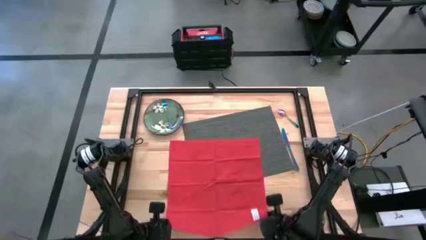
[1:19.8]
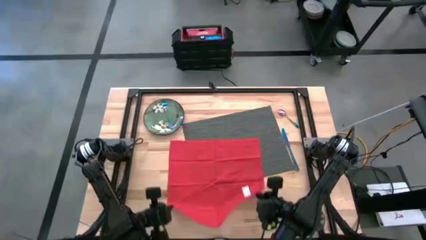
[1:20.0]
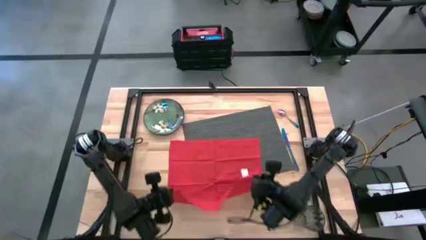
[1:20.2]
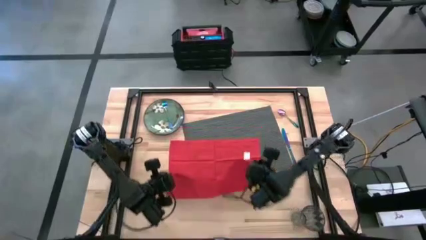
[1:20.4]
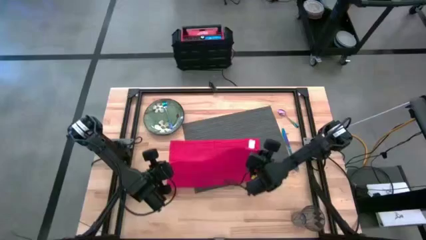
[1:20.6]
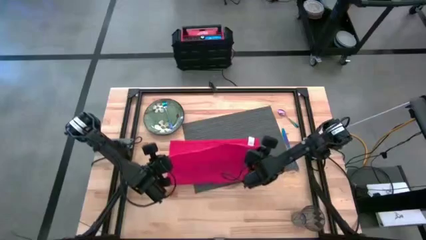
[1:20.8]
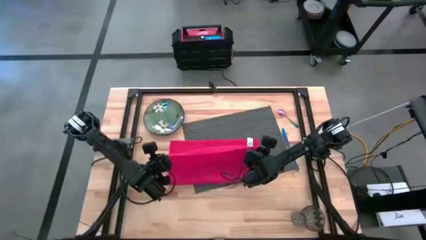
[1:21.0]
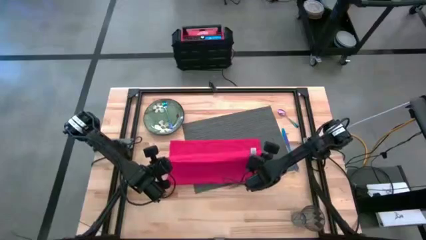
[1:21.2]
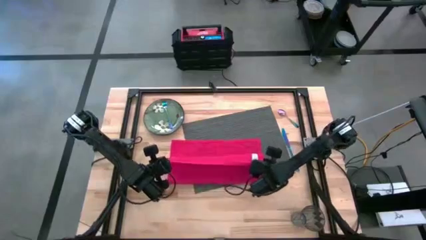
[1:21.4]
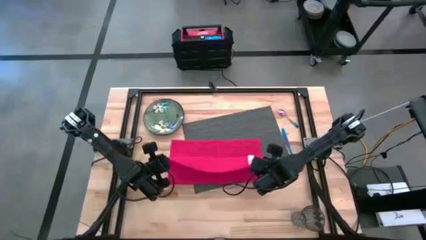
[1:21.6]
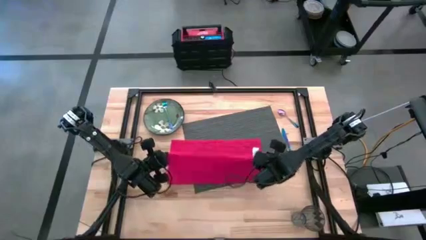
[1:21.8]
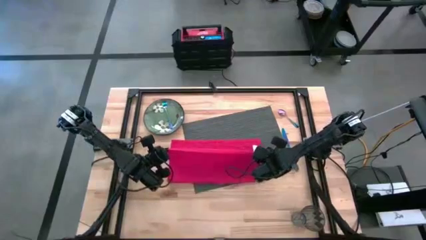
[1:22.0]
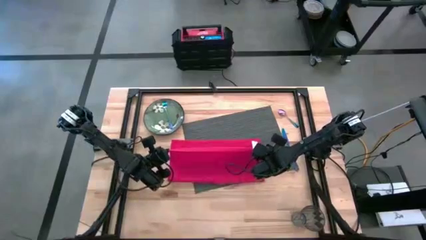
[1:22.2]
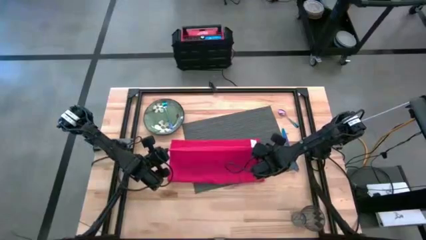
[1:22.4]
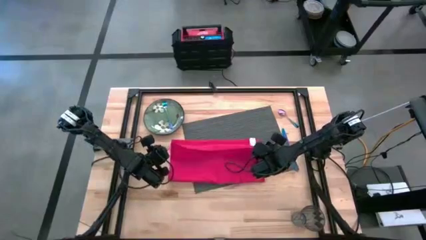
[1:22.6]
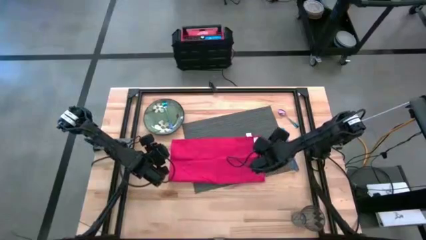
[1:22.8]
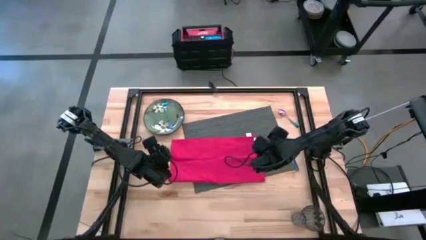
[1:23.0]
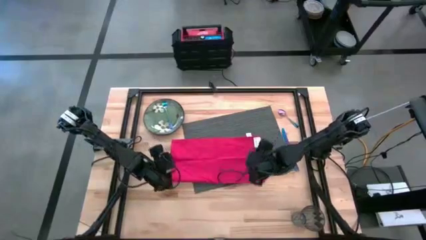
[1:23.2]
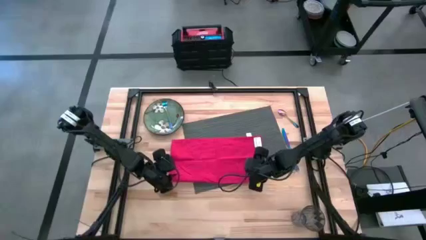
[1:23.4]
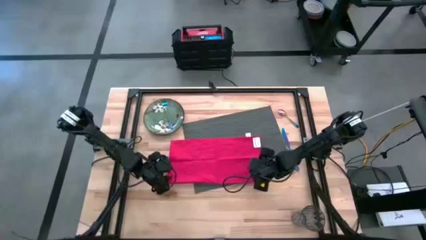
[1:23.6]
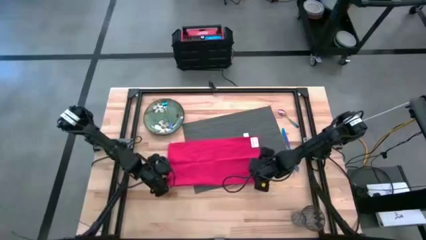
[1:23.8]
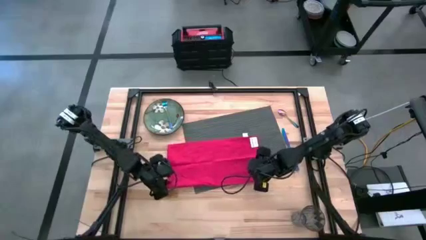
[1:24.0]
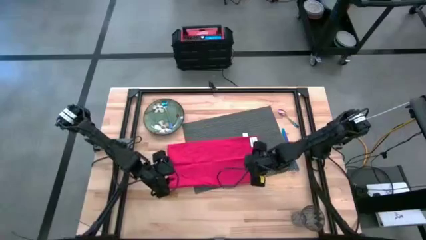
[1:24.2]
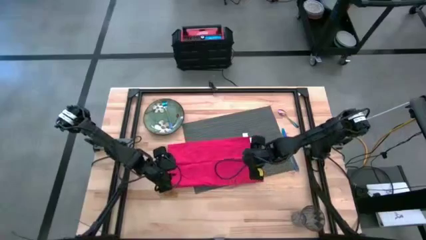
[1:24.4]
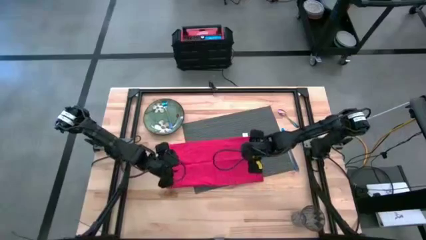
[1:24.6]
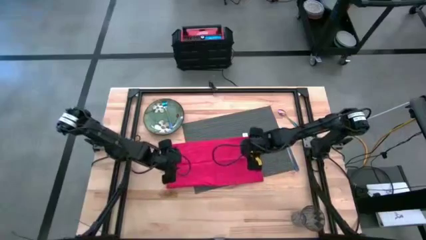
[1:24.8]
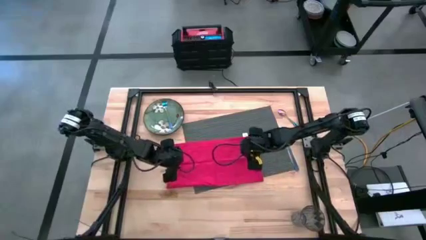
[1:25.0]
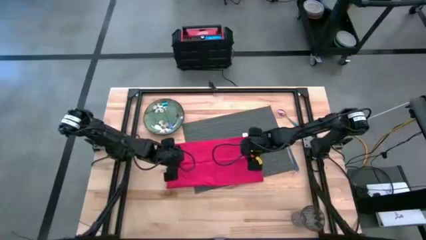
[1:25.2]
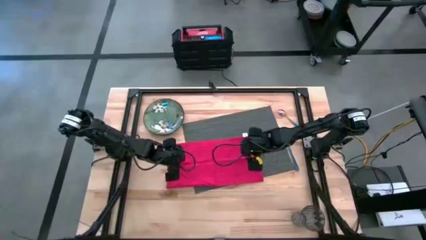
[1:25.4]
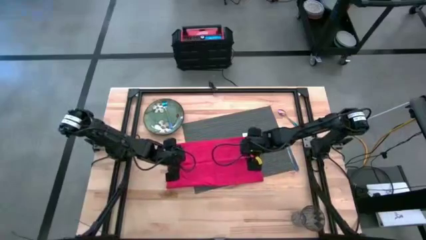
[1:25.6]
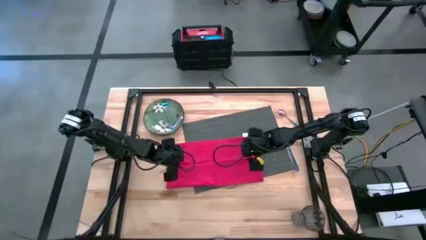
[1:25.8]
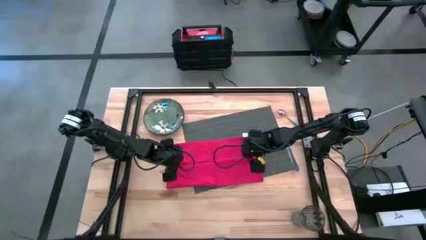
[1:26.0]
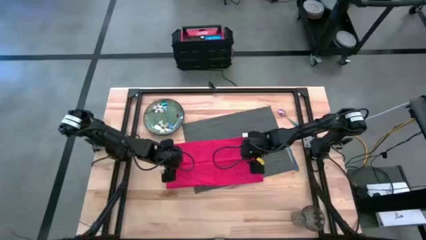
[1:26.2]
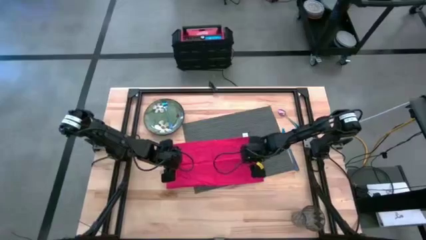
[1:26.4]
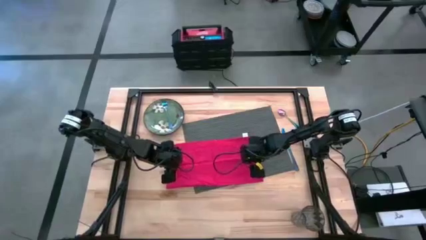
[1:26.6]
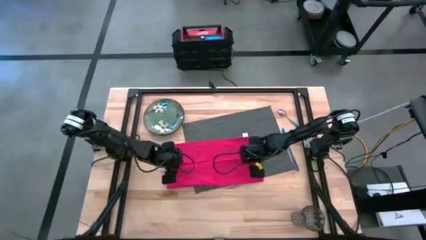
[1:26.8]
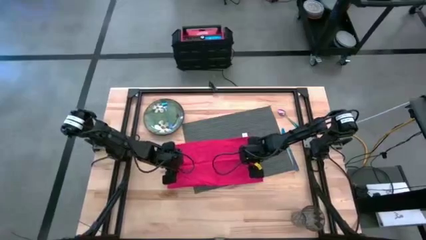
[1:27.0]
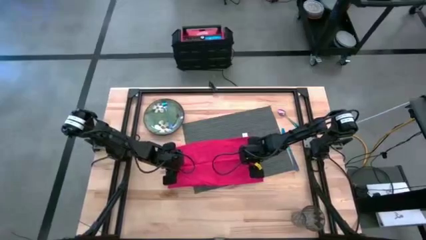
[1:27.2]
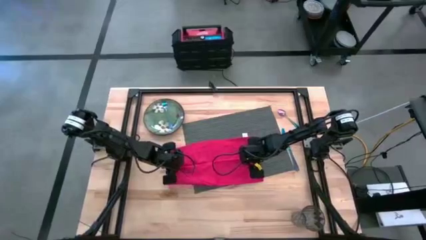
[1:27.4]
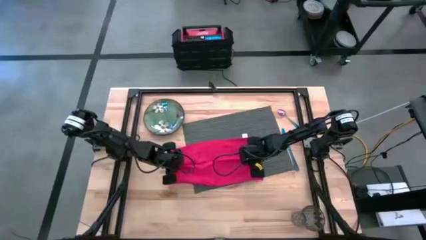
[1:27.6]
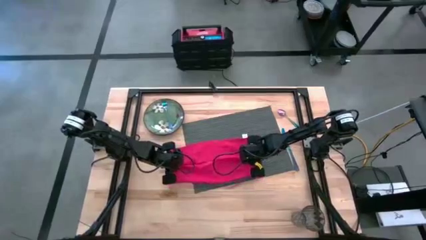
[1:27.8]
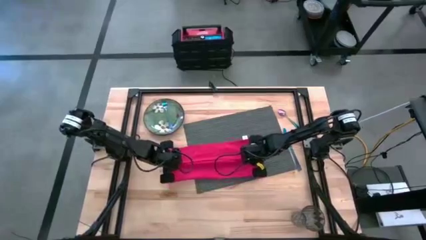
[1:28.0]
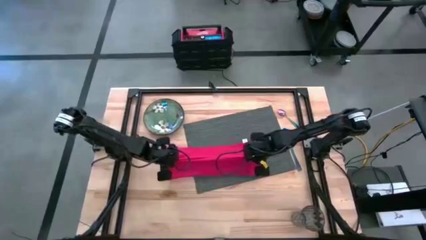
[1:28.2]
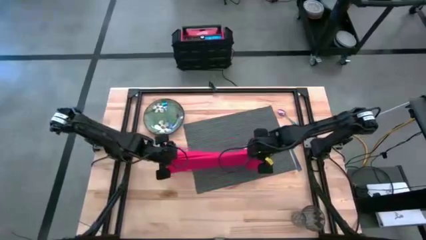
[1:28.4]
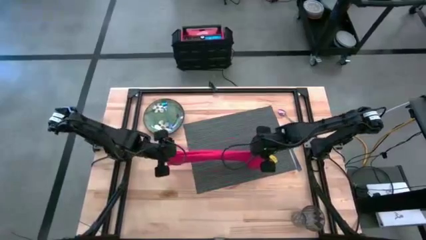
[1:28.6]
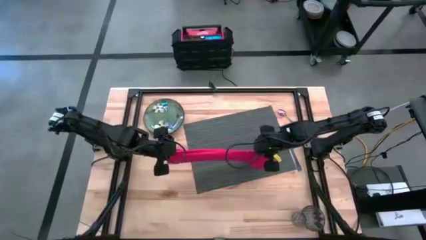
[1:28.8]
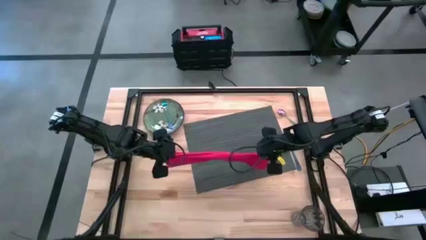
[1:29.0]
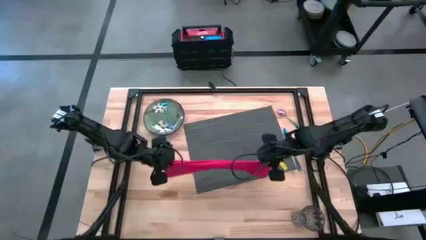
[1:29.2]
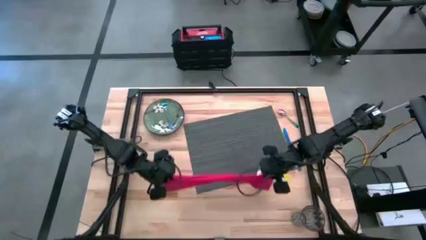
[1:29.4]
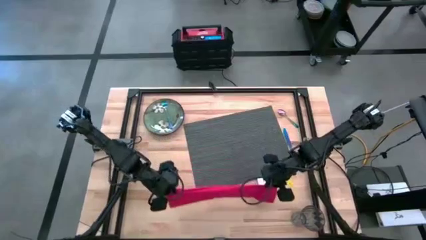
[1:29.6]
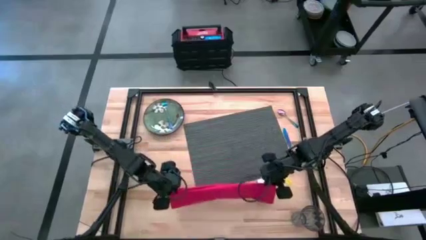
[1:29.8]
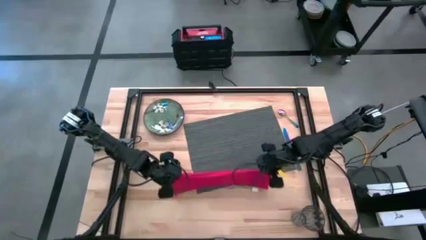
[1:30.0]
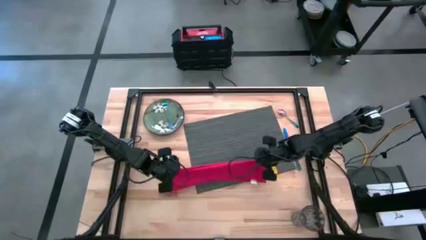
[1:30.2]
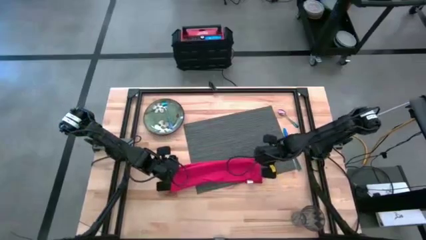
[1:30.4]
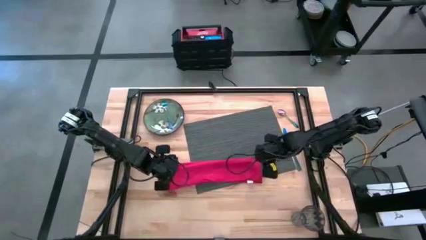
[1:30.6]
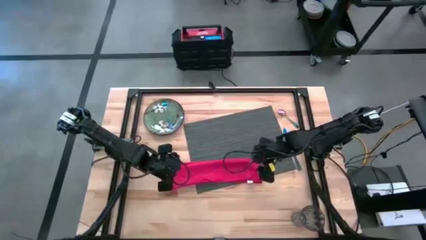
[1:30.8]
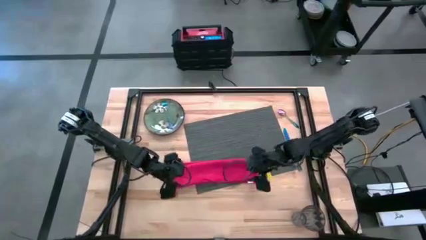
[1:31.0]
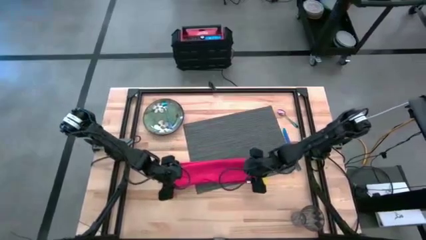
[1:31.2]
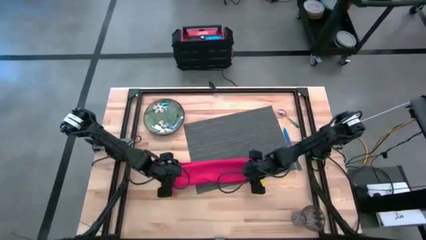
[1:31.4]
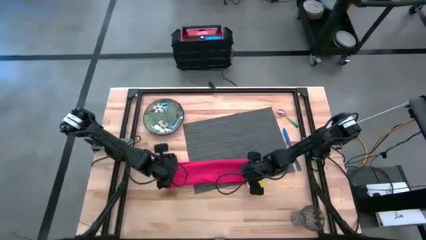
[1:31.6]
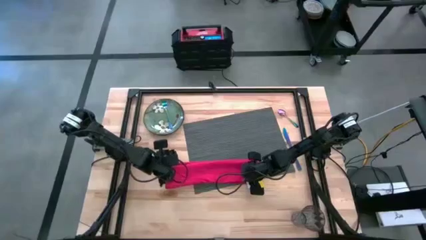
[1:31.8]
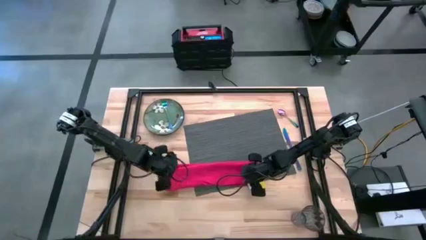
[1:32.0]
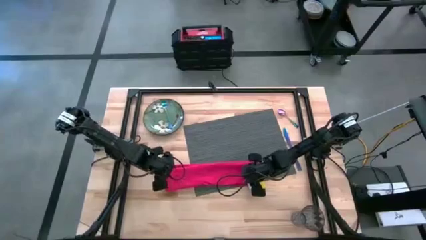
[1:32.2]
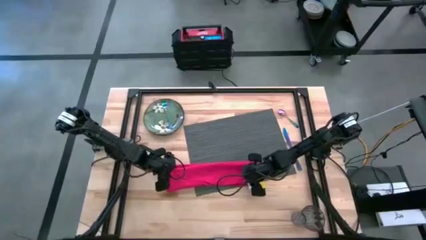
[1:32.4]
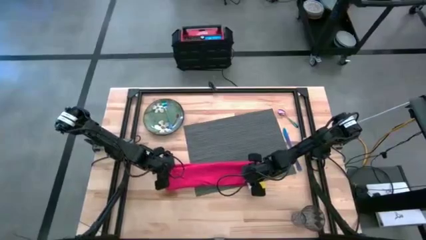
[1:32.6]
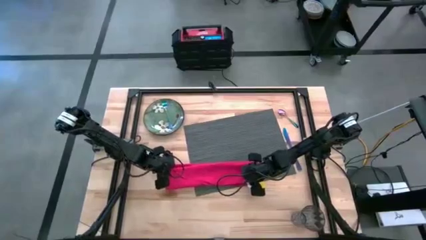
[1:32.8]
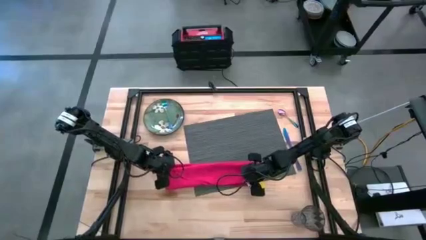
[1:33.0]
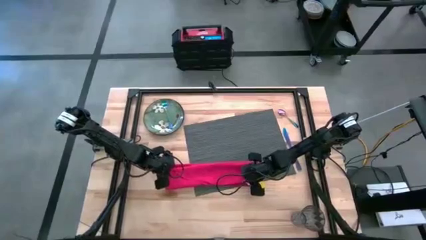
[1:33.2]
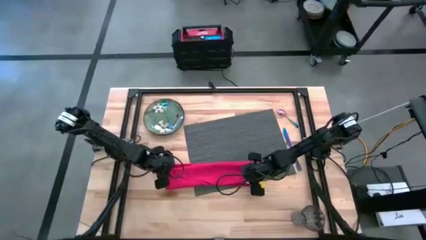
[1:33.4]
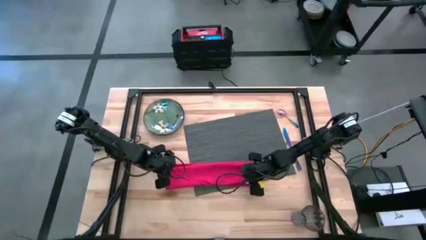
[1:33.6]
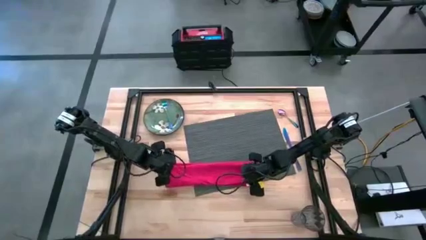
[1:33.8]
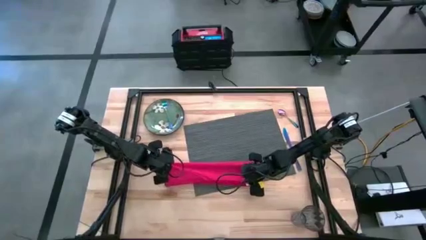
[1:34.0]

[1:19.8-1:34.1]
Task: Set table place
Fold the red table napkin
